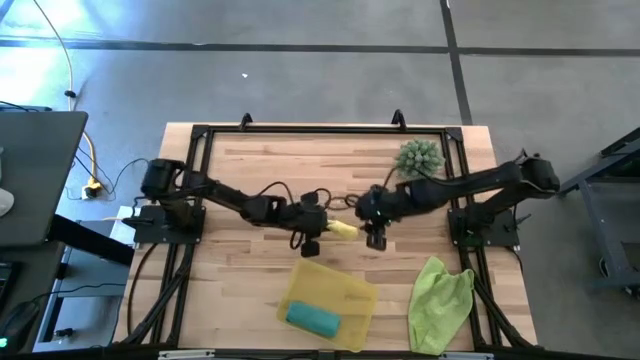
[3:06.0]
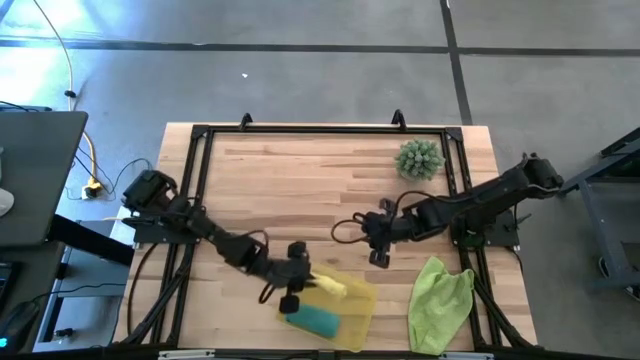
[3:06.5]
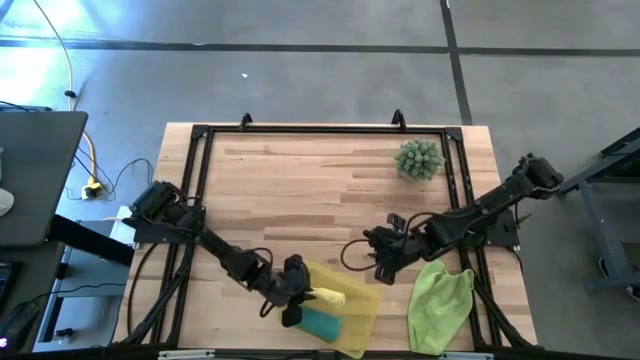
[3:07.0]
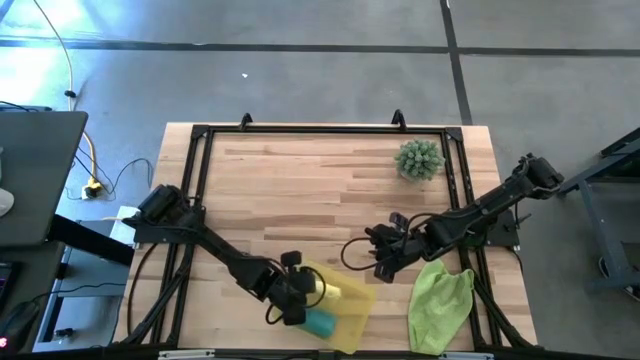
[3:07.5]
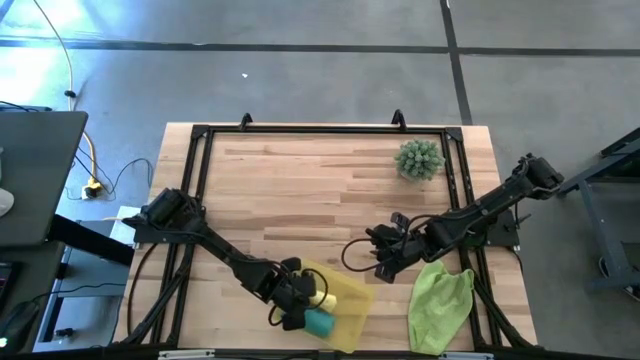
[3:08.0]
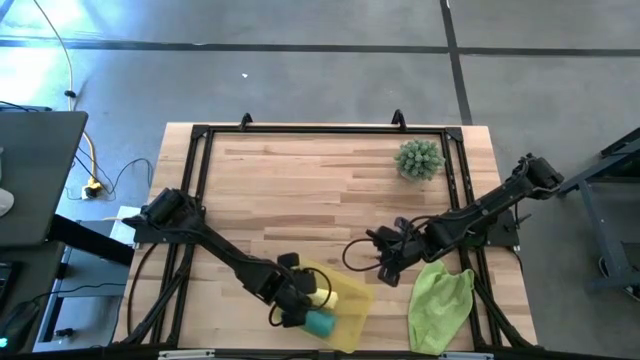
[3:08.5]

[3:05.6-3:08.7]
Task: Roll microfiber towels into tight, uniform cylinder then place into a basket
Put the rolled yellow towel into the yellow bin

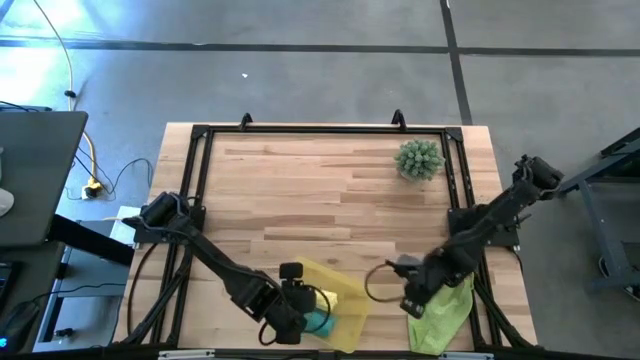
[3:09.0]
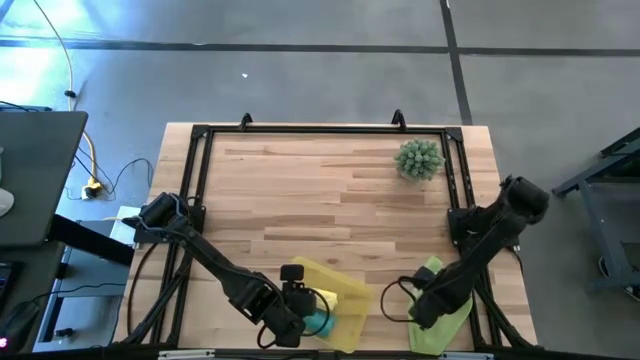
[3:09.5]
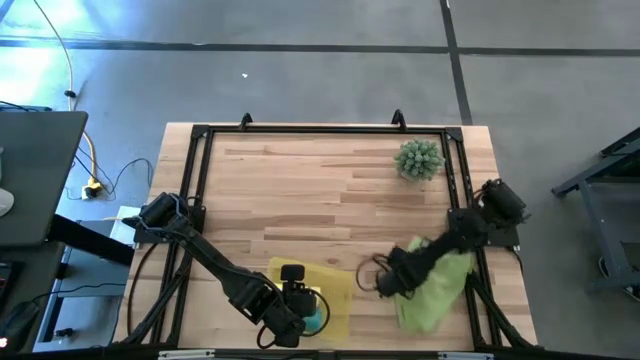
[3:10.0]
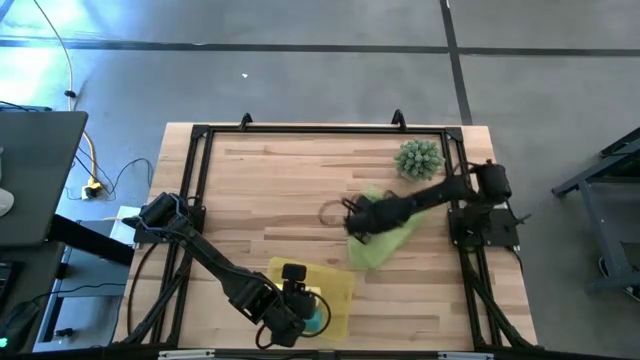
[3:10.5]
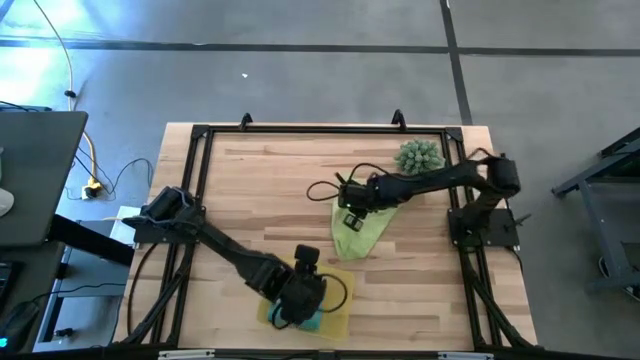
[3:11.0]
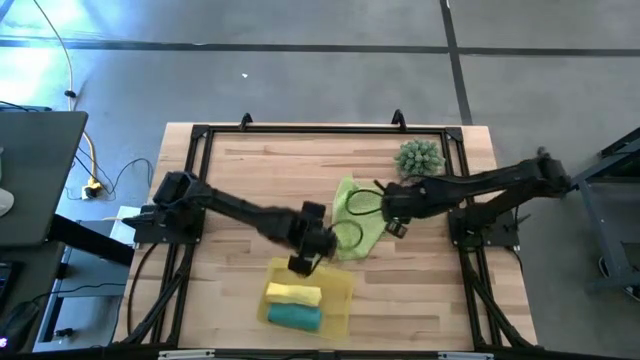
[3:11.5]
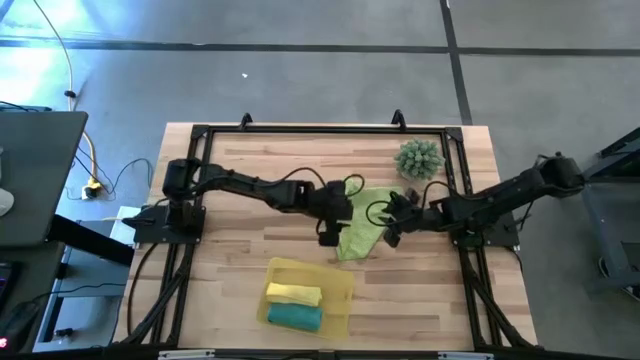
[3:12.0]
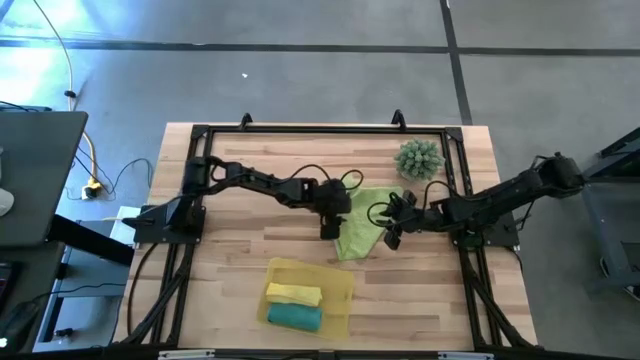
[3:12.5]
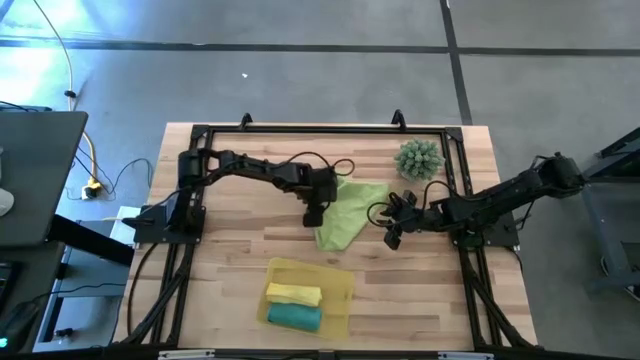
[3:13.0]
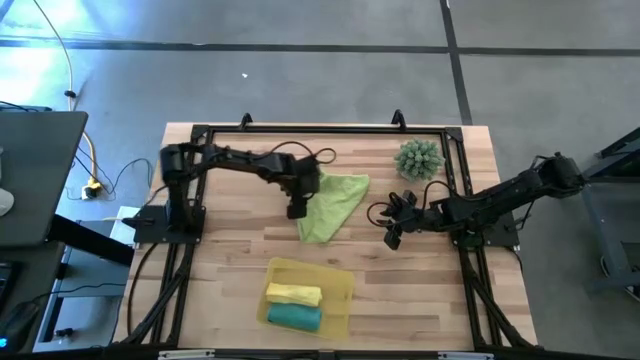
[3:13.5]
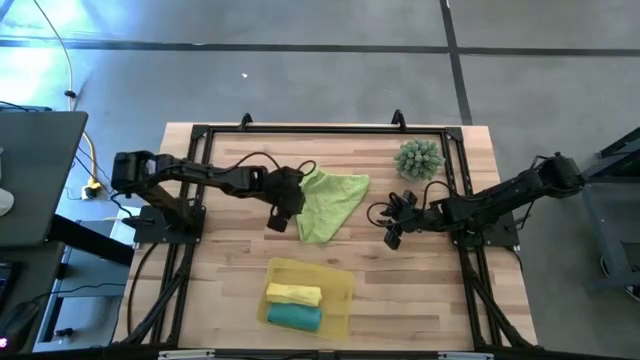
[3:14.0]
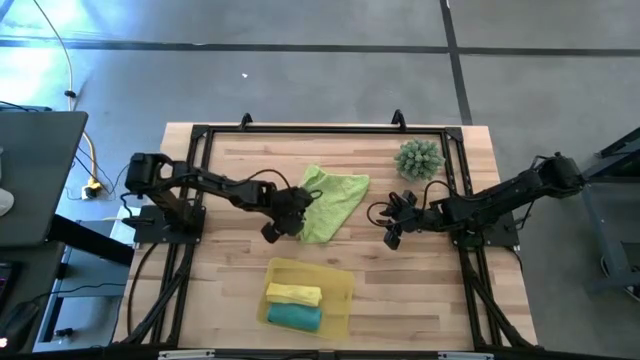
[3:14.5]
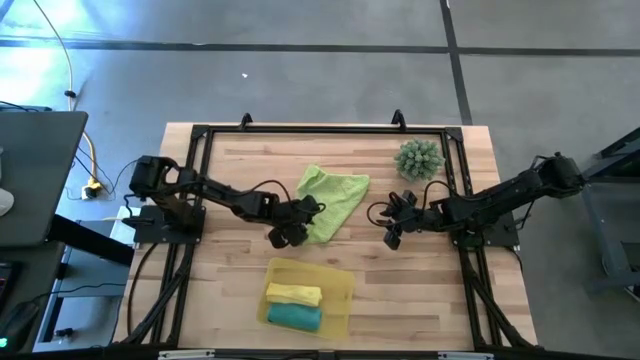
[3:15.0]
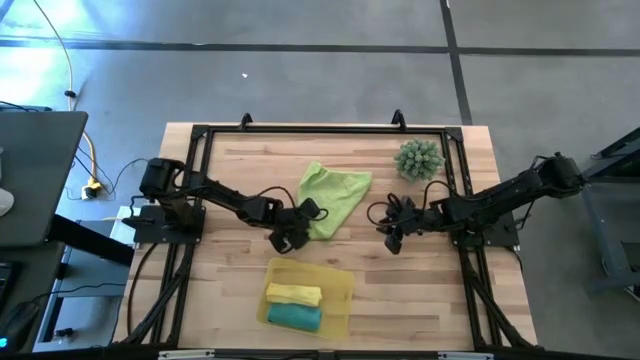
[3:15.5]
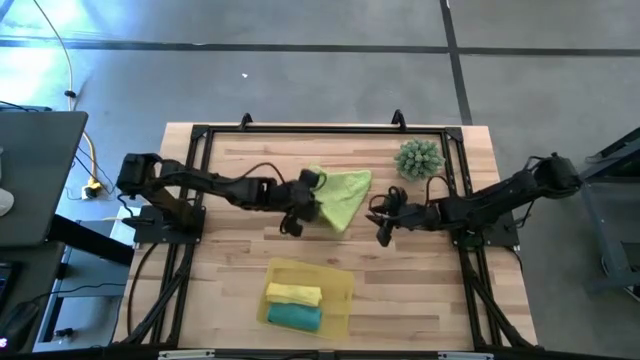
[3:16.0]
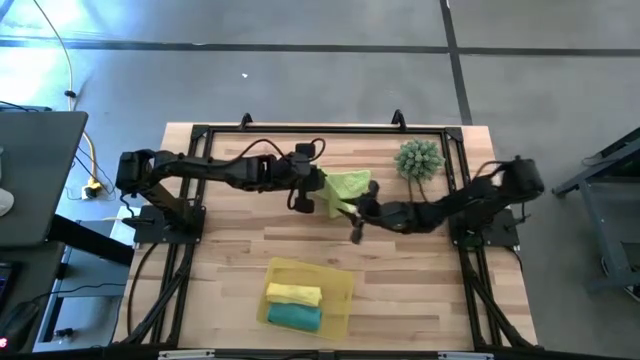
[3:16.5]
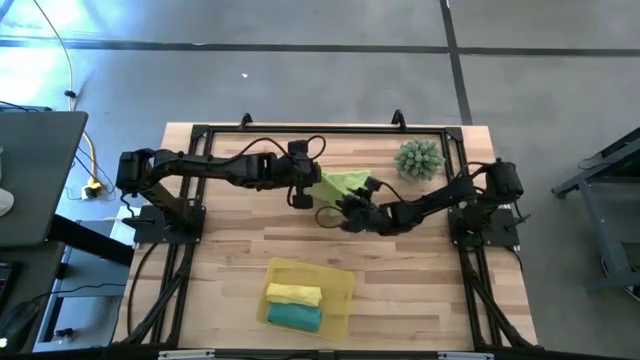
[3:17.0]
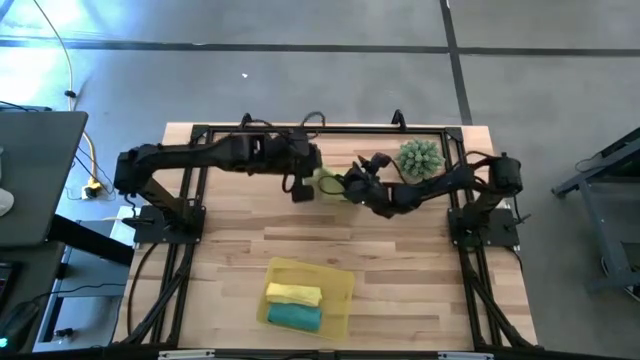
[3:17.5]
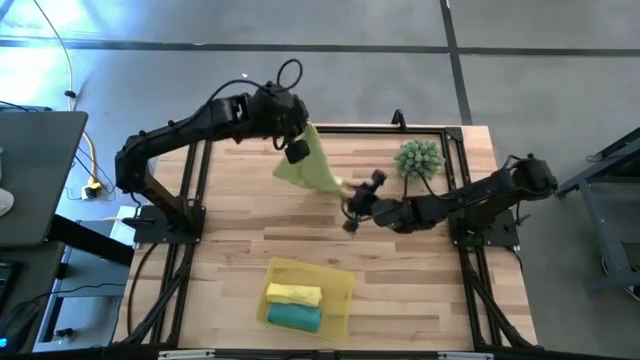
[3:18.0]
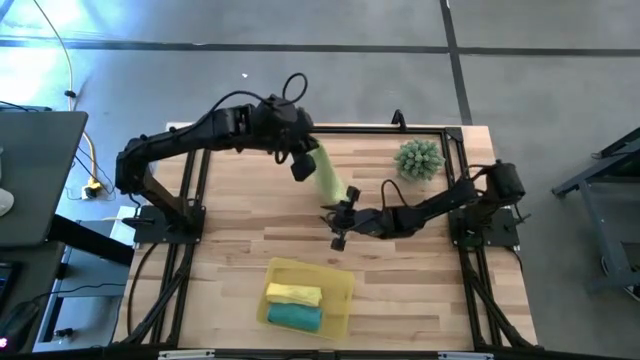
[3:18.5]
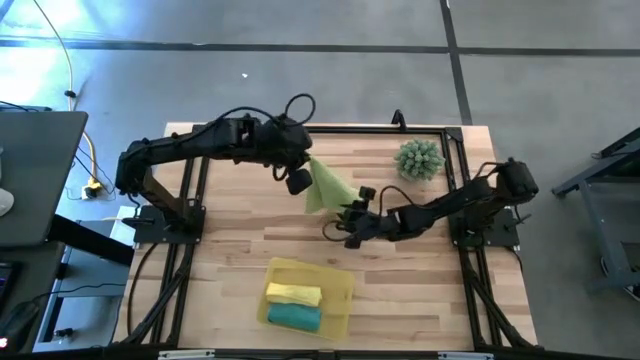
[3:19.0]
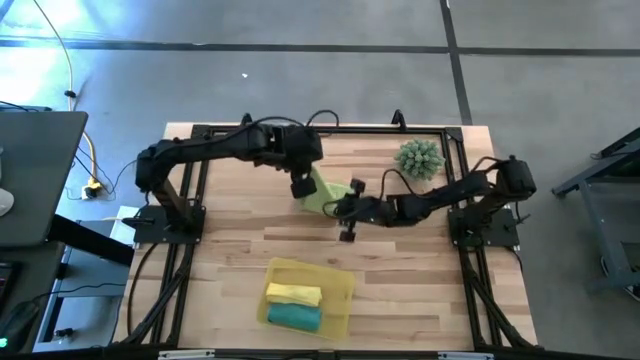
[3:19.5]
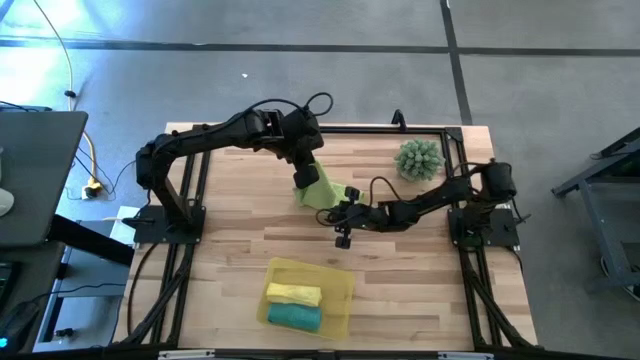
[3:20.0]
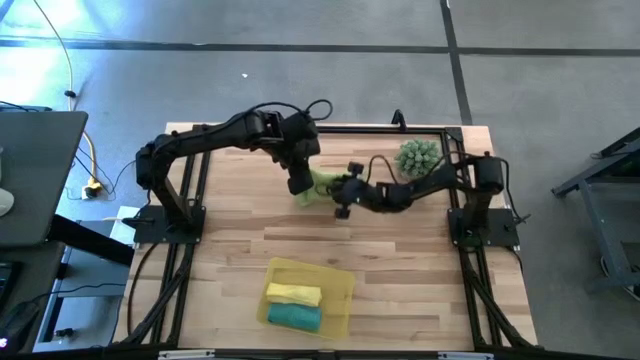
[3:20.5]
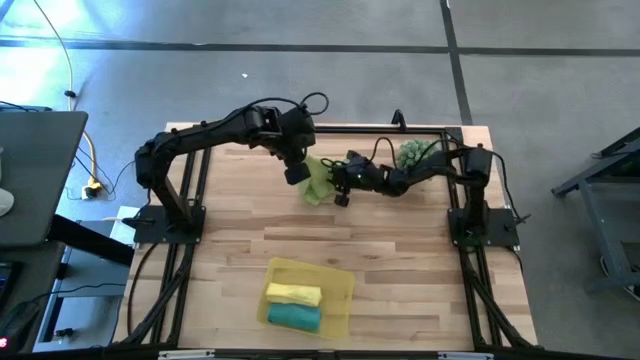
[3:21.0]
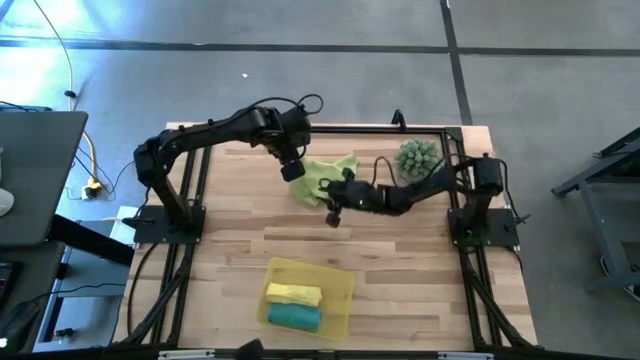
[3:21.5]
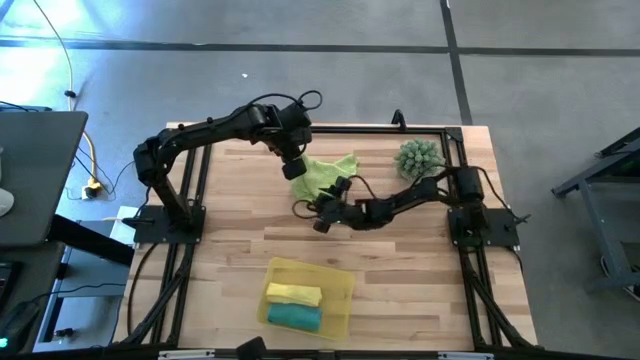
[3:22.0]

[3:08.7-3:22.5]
Fold the green towel

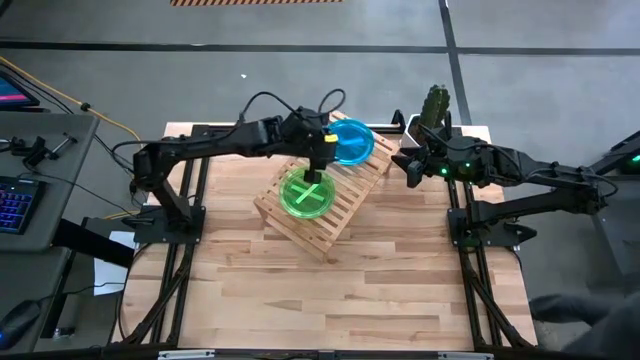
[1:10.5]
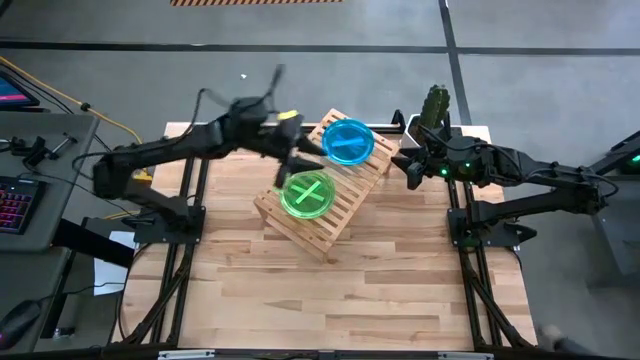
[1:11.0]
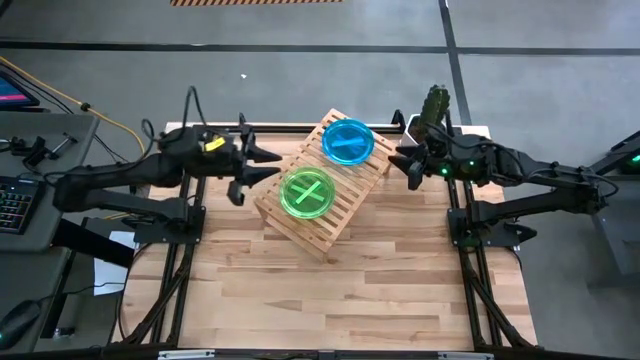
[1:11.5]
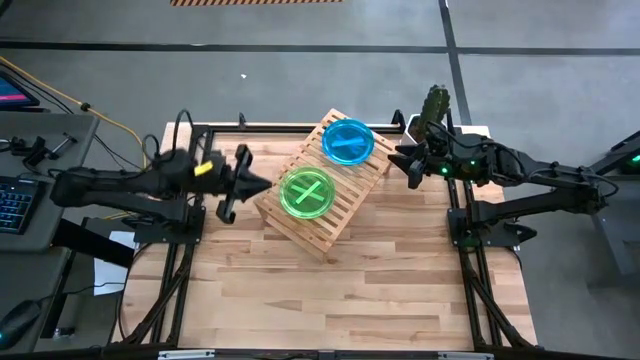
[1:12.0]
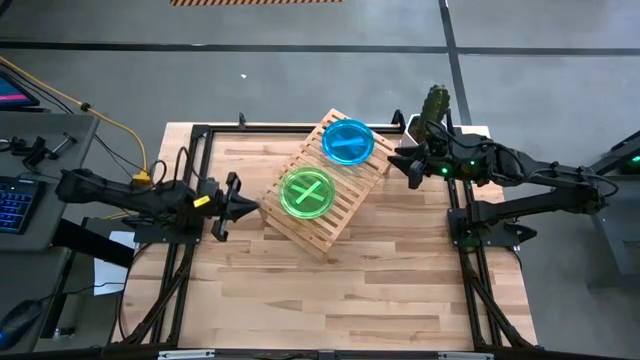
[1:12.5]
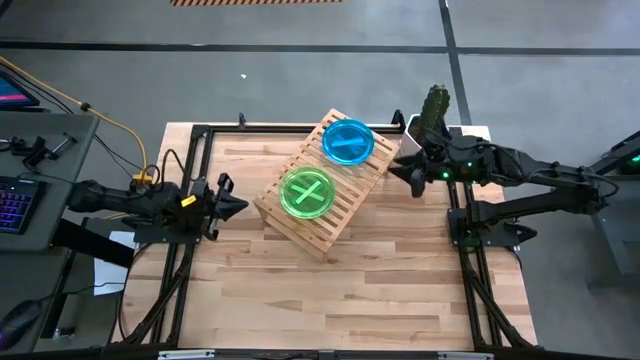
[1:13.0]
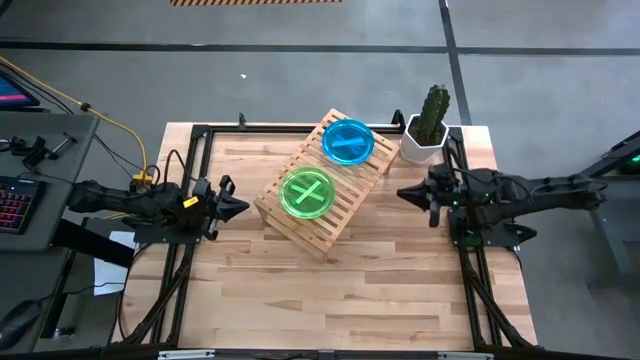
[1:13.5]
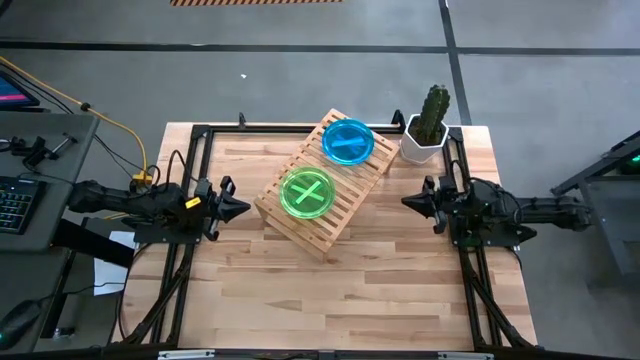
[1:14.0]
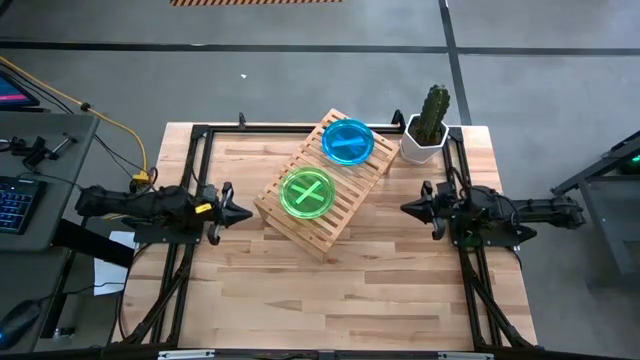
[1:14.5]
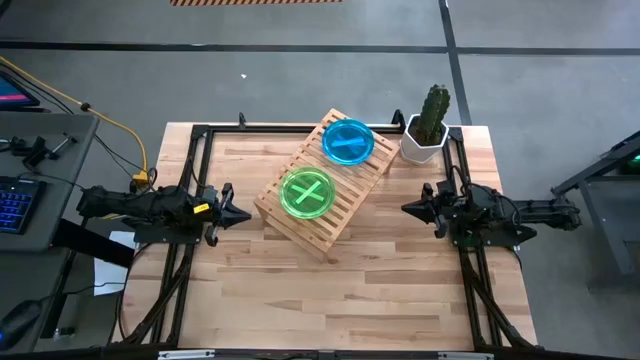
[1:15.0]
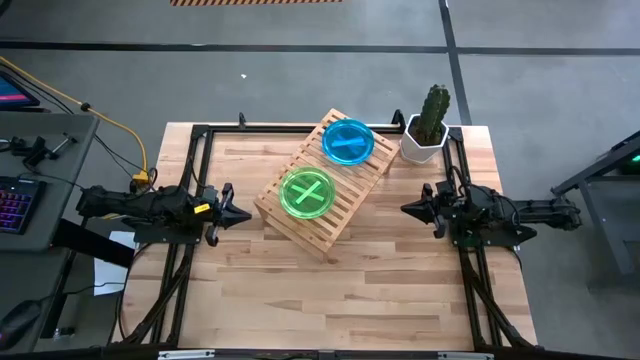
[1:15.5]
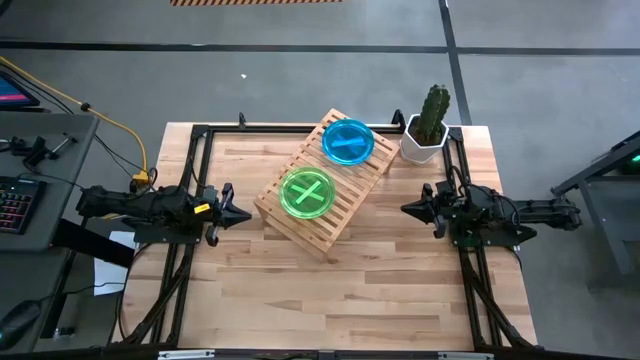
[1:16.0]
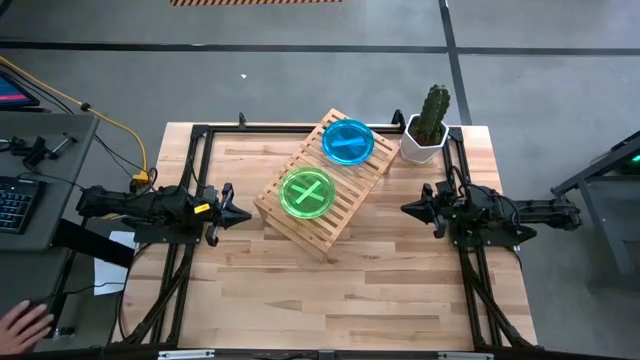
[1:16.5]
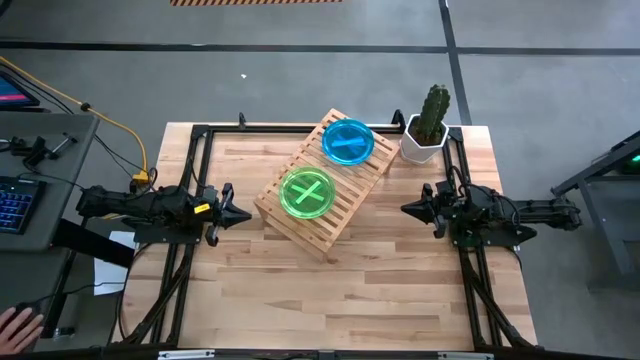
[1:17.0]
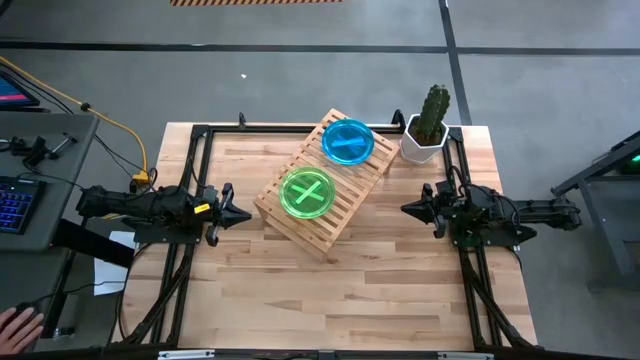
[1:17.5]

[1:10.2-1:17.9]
Task: Place and stack plates onto a shelf
Return to Home Position
